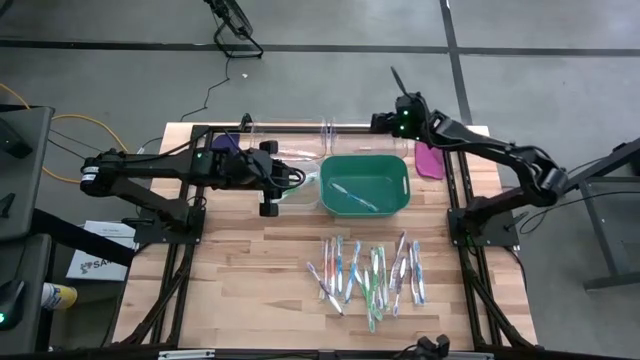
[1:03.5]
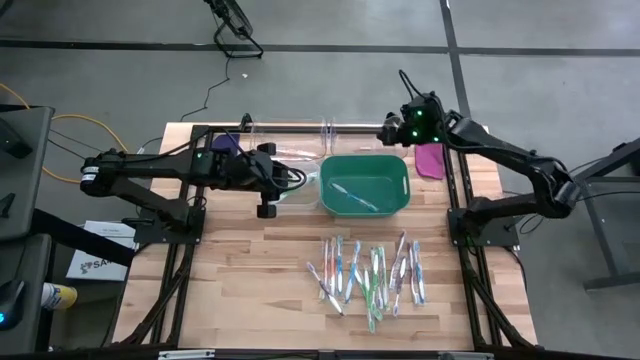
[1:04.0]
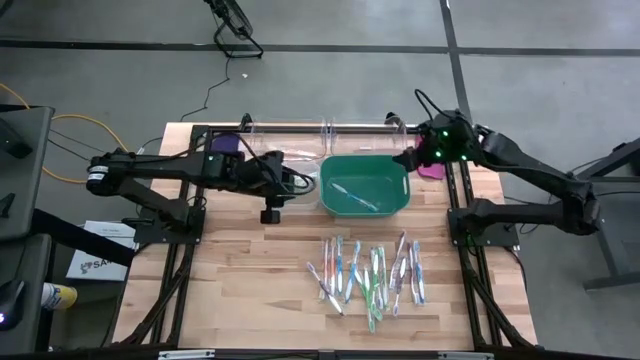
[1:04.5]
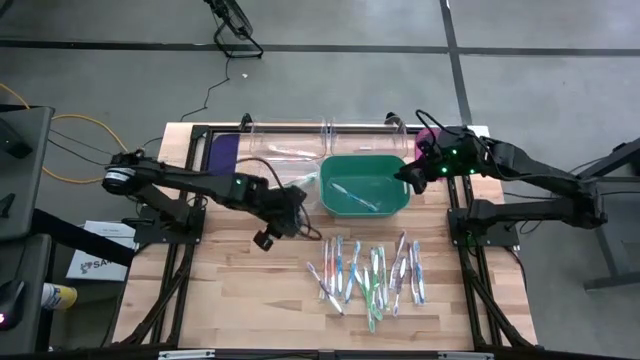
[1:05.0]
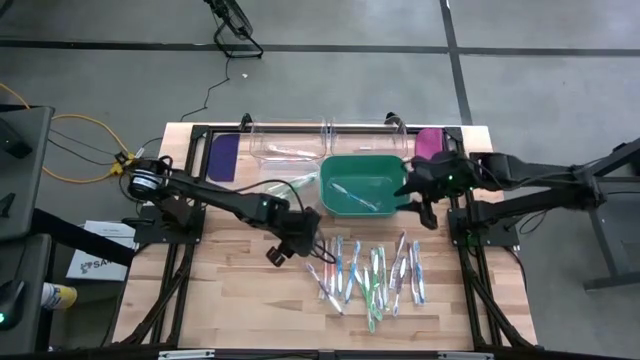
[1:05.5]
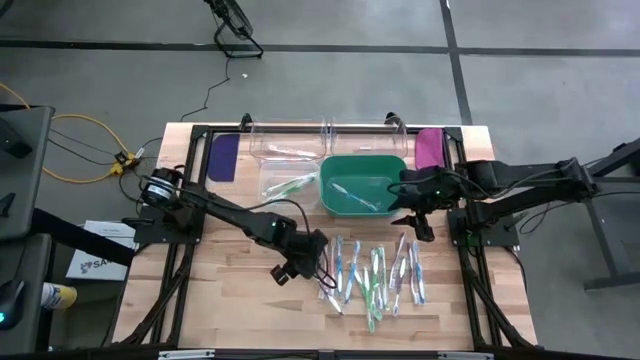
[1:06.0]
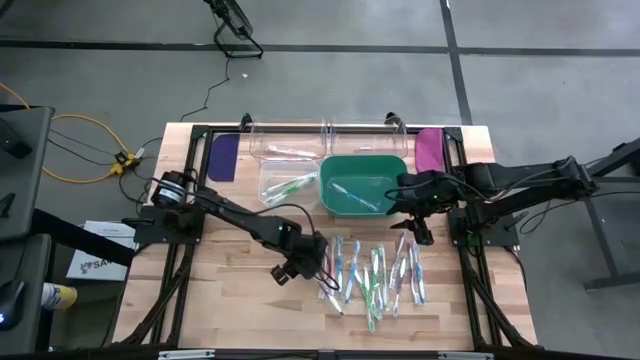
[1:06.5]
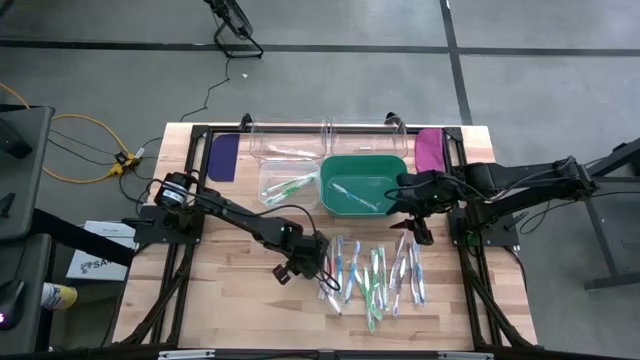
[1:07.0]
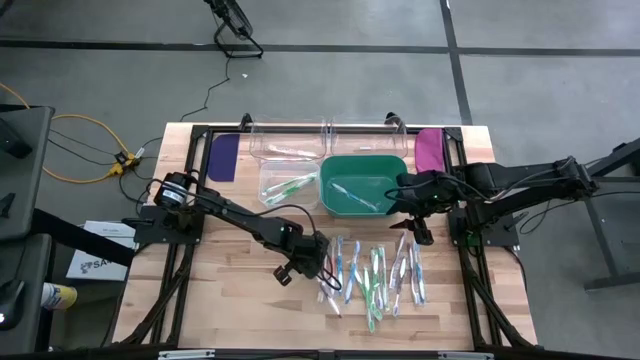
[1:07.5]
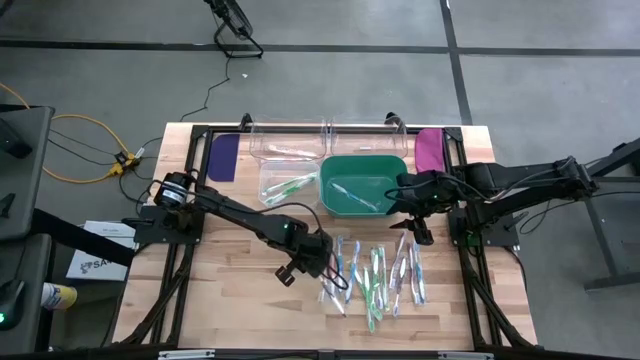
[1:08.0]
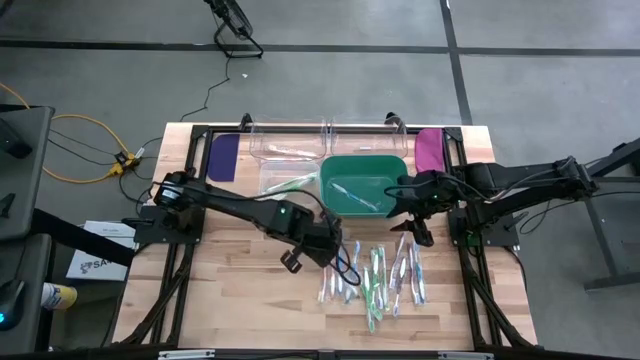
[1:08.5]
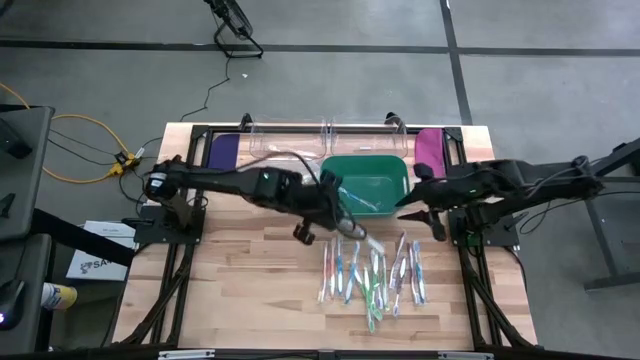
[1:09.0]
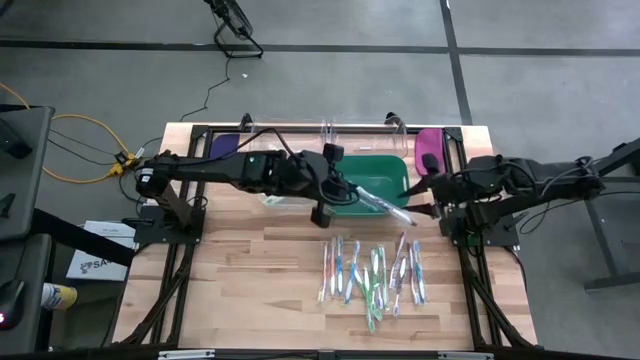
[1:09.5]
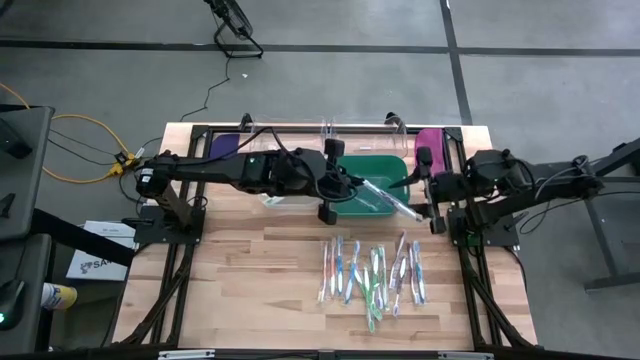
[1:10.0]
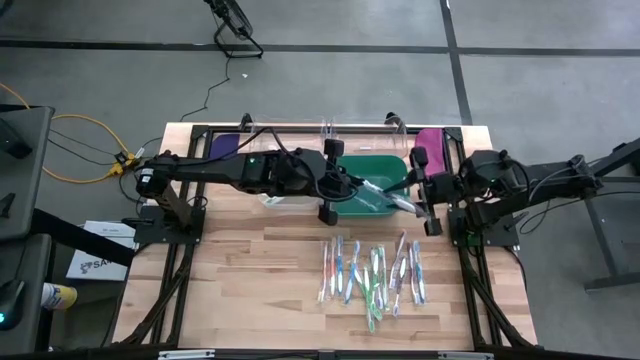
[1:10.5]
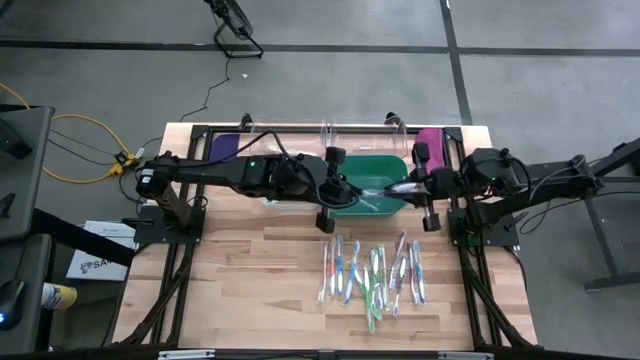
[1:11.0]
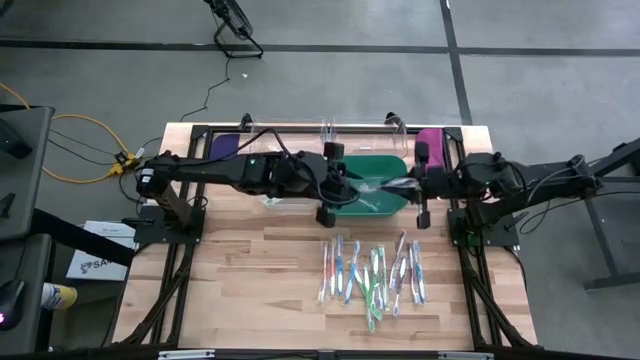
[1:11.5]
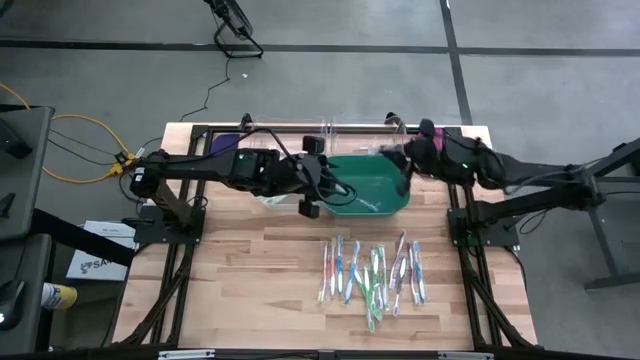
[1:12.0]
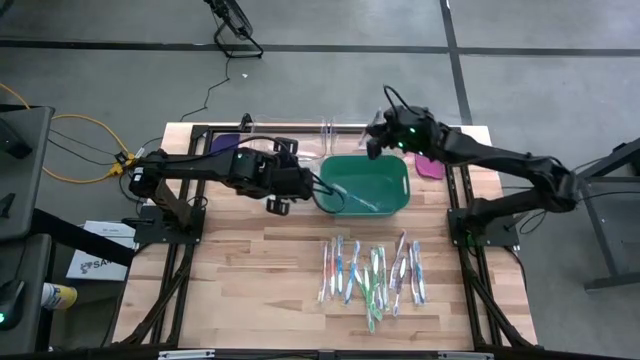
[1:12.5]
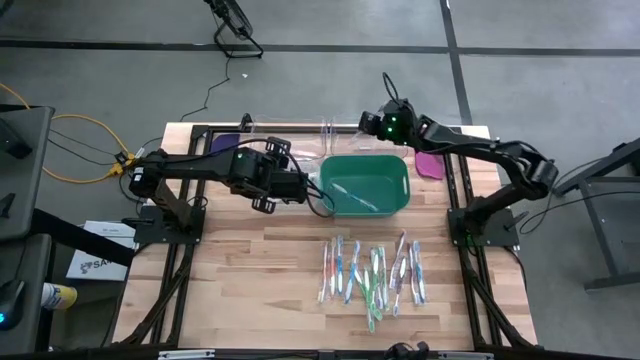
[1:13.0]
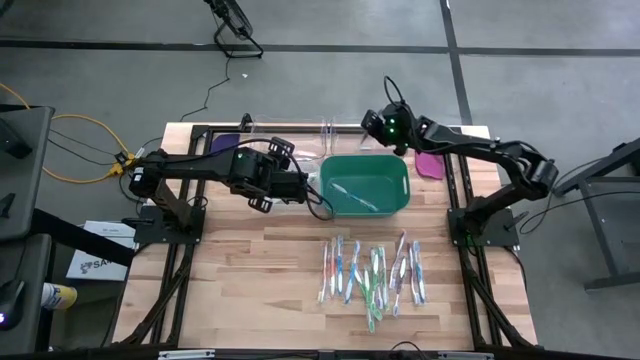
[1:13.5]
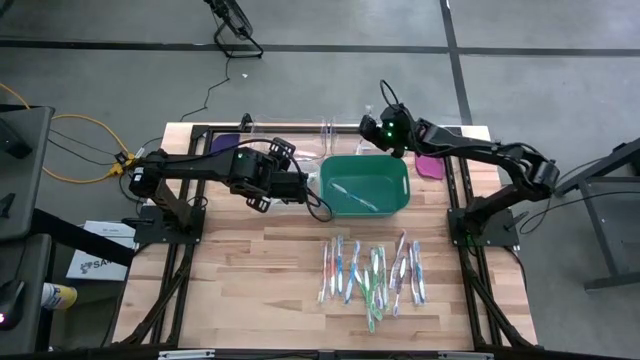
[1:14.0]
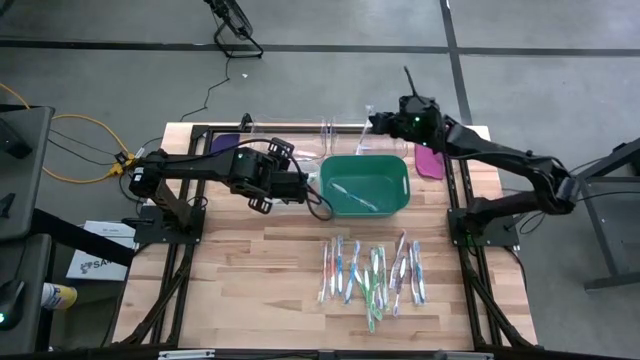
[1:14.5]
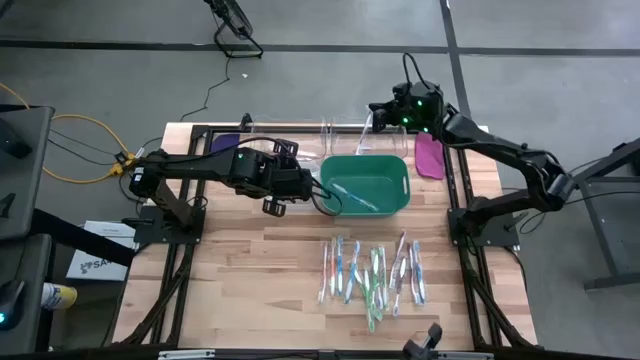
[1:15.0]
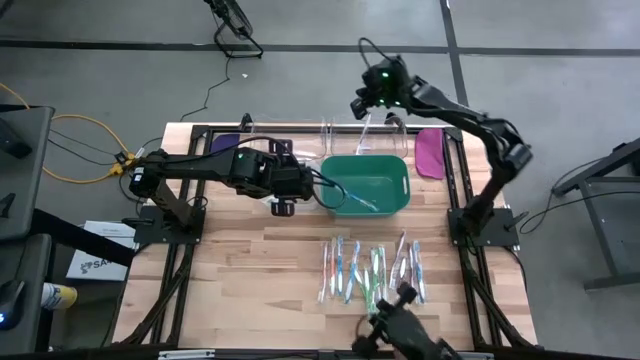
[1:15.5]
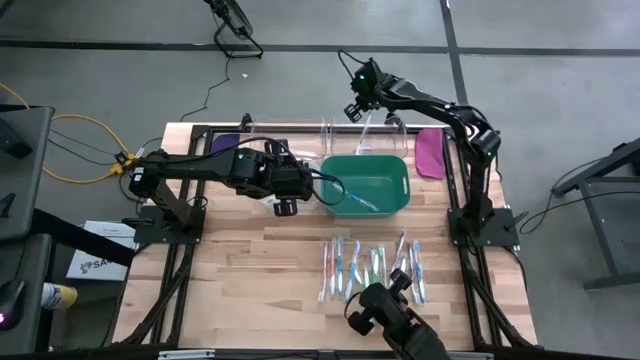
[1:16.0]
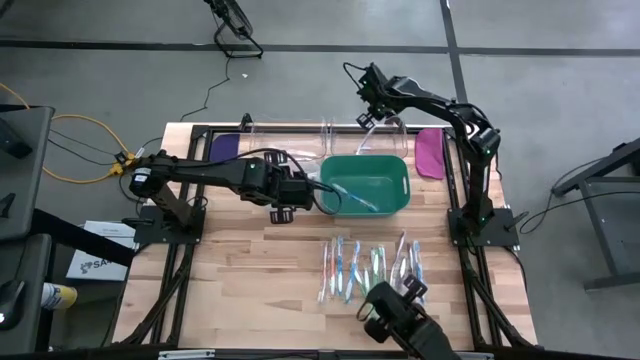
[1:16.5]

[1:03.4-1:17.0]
Task: Pick & Place Toothbrushes
Put the purple toothbrush into the right transparent bin

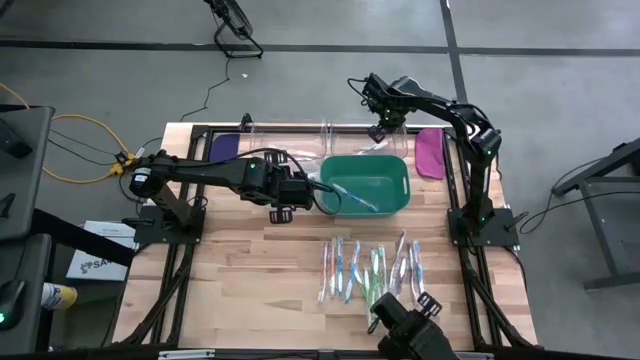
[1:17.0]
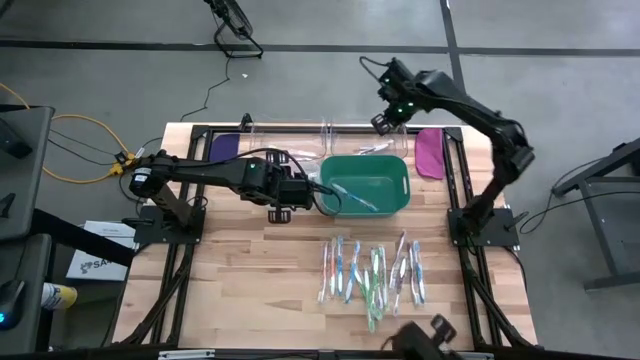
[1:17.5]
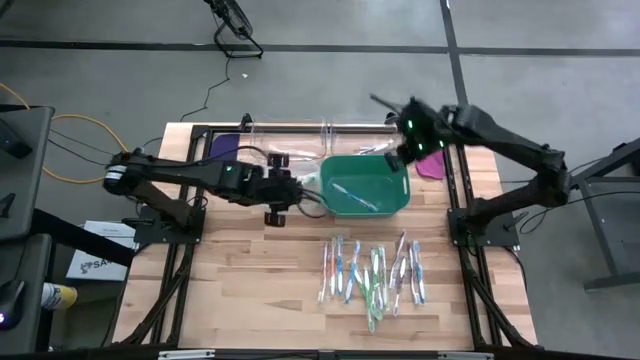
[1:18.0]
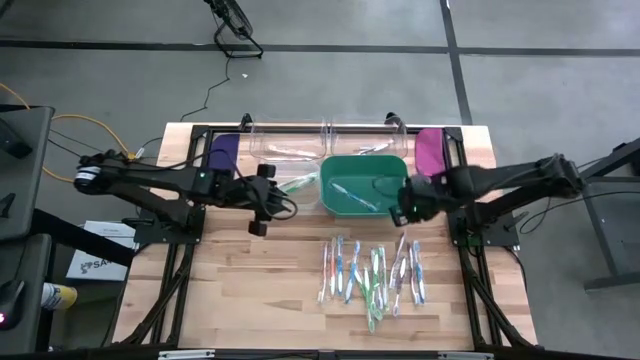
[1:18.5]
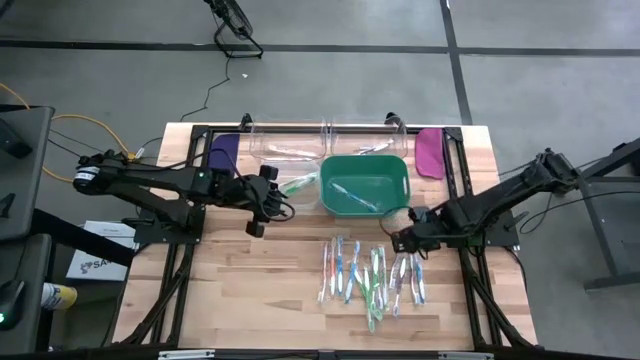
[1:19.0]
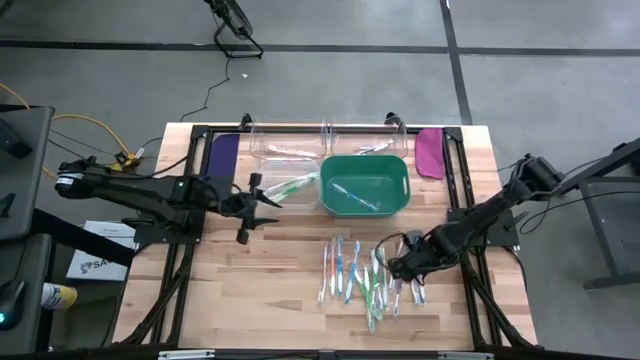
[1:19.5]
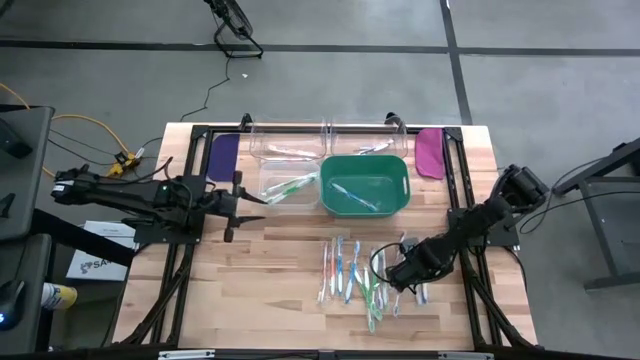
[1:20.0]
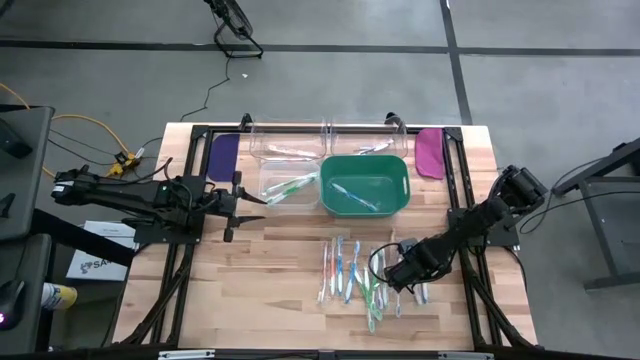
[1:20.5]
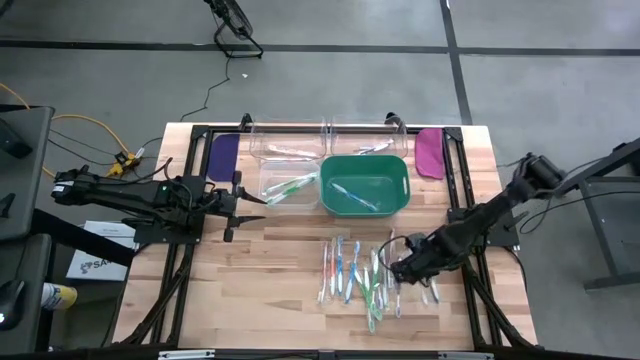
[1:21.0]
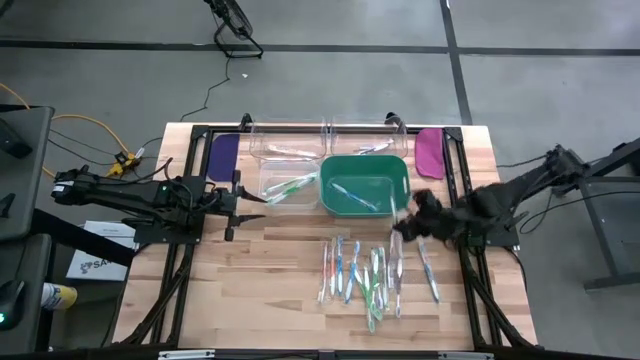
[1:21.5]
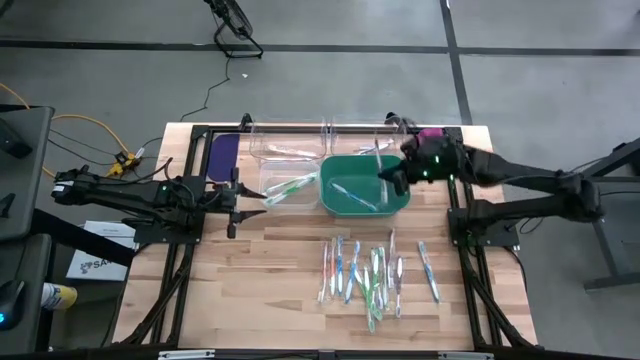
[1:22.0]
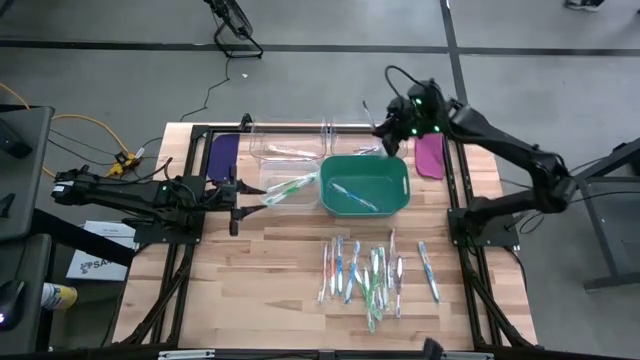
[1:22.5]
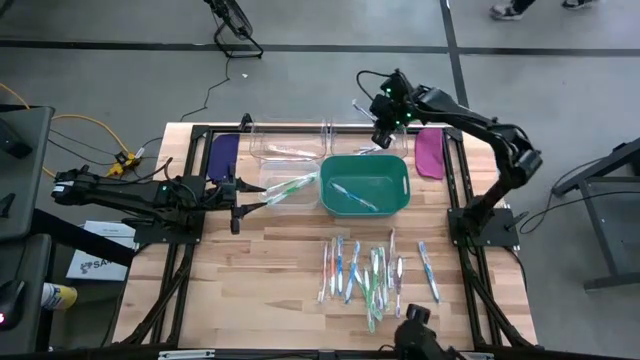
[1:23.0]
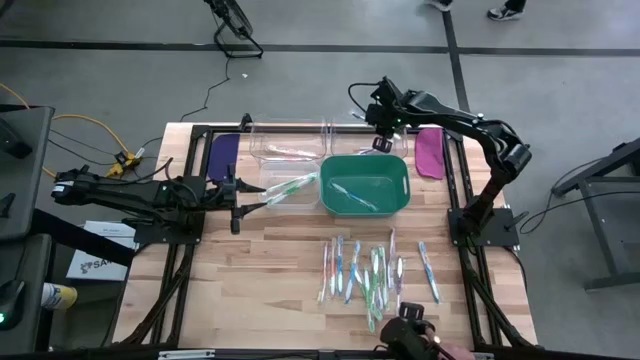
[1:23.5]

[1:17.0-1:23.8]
Put the purple toothbrush into the right transparent bin
